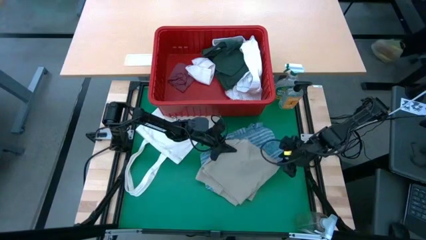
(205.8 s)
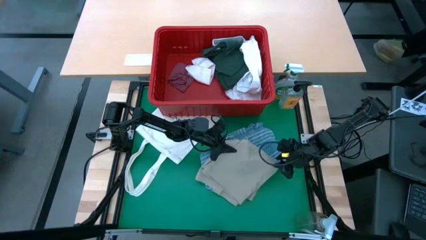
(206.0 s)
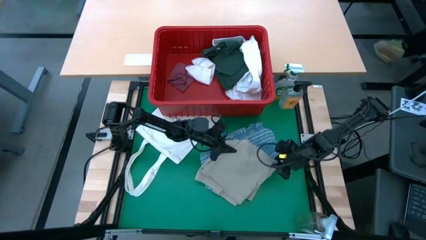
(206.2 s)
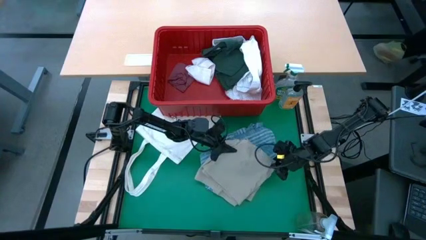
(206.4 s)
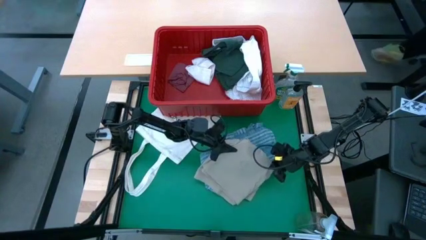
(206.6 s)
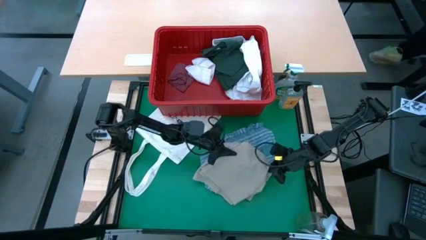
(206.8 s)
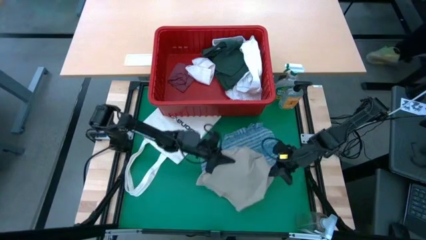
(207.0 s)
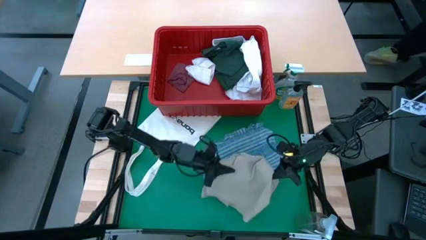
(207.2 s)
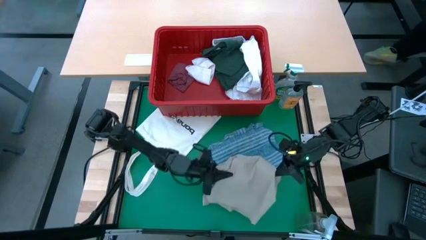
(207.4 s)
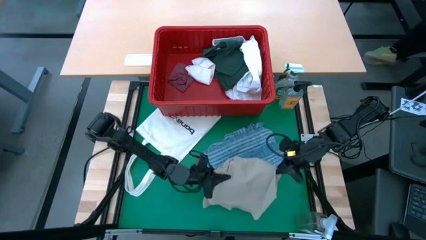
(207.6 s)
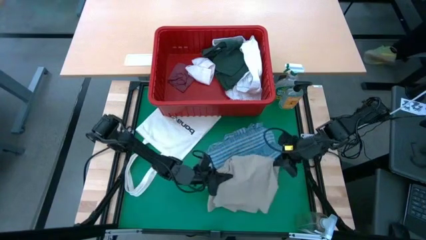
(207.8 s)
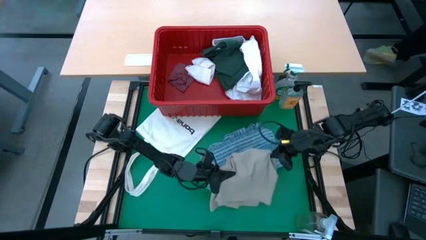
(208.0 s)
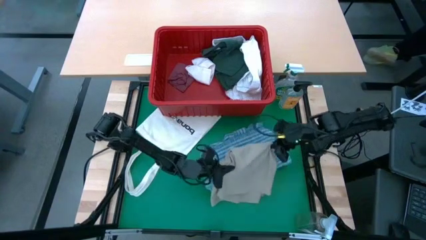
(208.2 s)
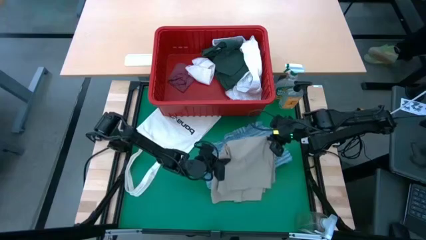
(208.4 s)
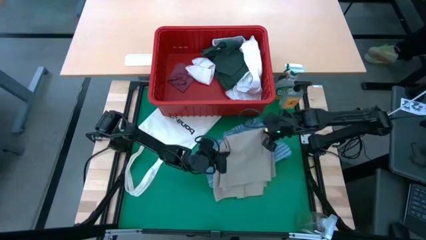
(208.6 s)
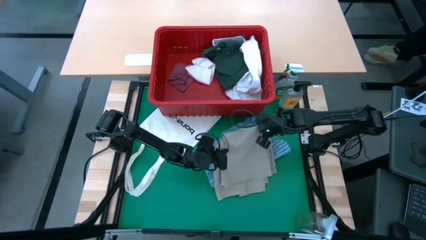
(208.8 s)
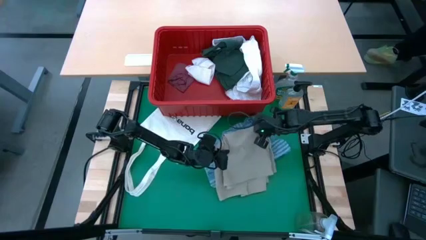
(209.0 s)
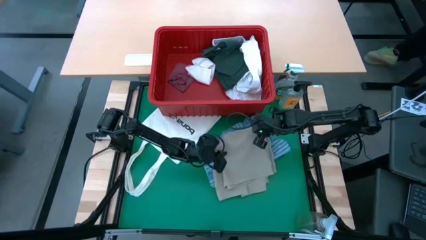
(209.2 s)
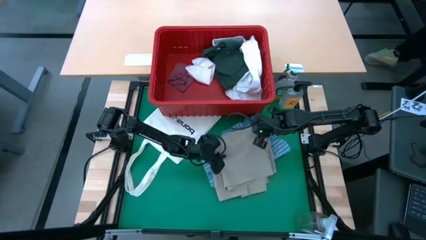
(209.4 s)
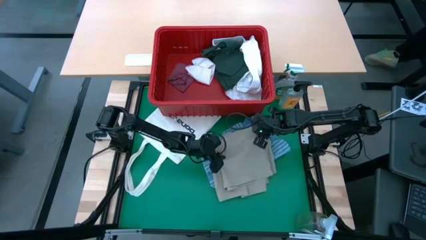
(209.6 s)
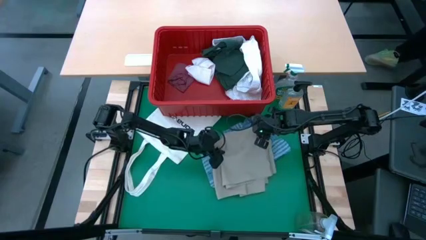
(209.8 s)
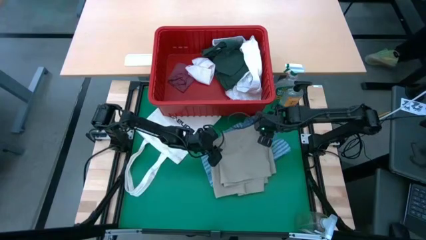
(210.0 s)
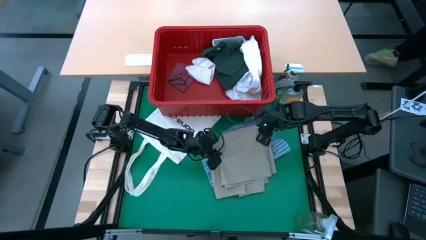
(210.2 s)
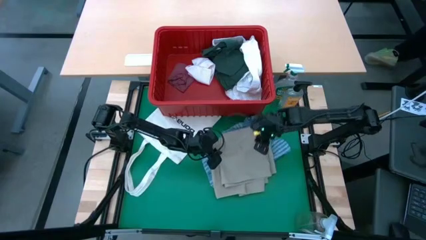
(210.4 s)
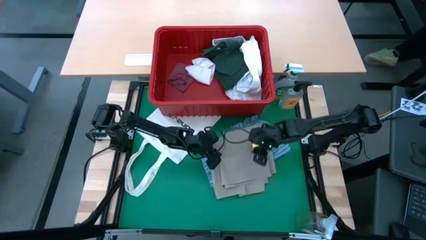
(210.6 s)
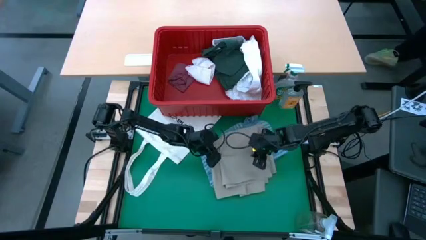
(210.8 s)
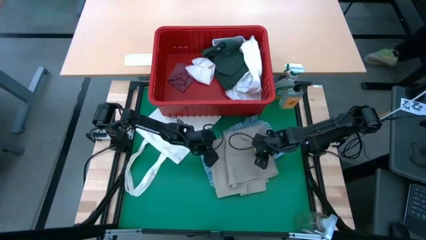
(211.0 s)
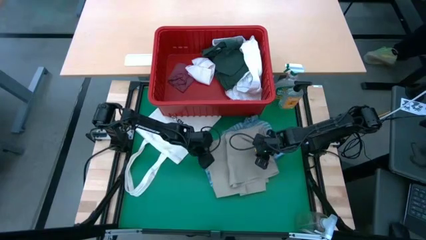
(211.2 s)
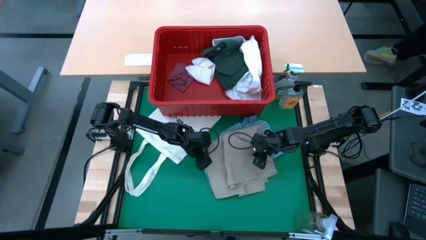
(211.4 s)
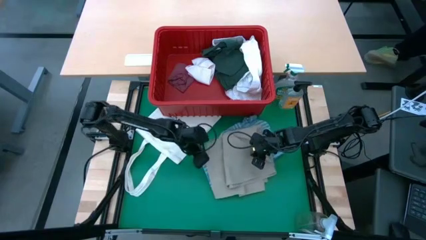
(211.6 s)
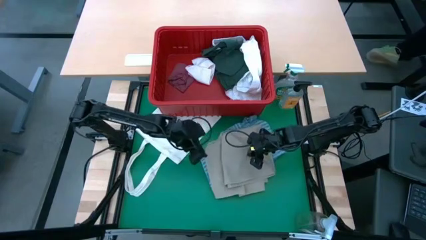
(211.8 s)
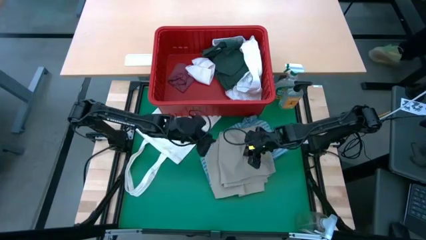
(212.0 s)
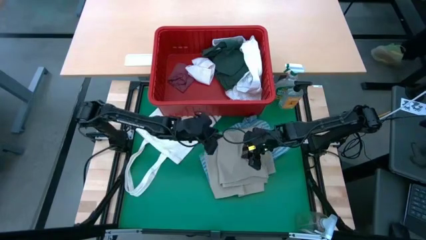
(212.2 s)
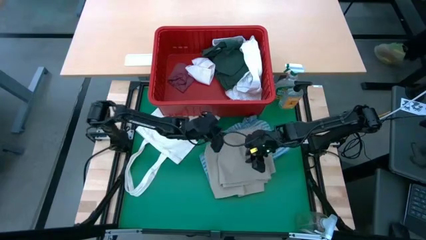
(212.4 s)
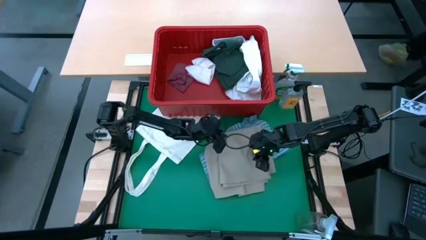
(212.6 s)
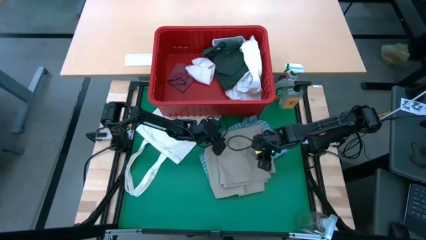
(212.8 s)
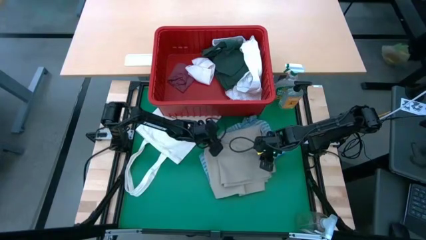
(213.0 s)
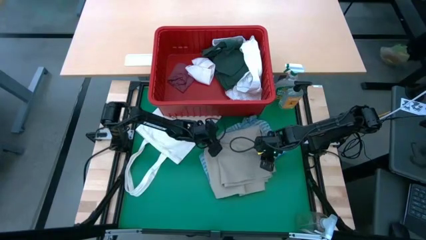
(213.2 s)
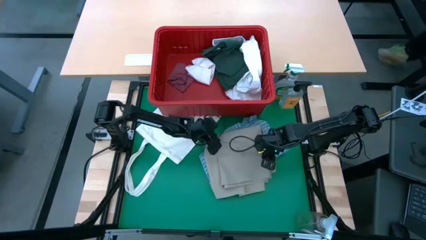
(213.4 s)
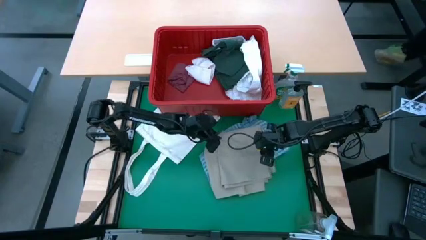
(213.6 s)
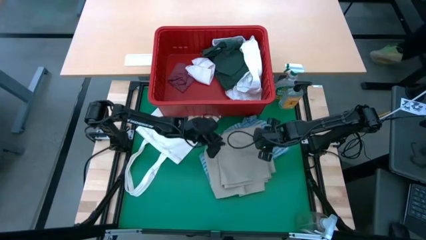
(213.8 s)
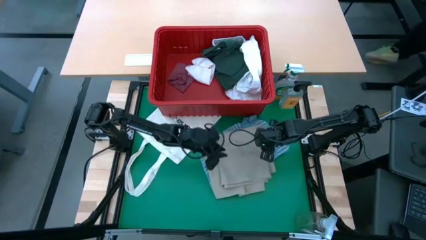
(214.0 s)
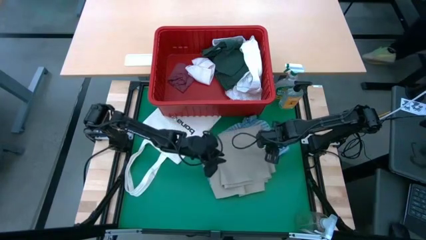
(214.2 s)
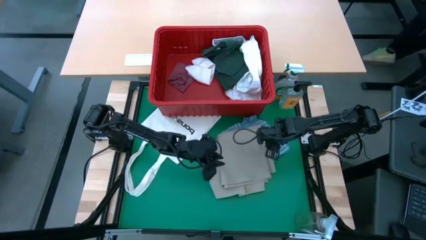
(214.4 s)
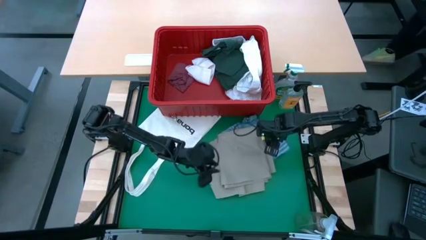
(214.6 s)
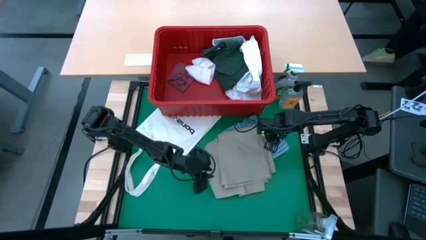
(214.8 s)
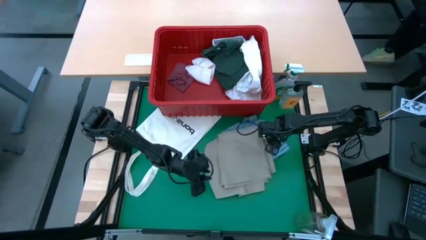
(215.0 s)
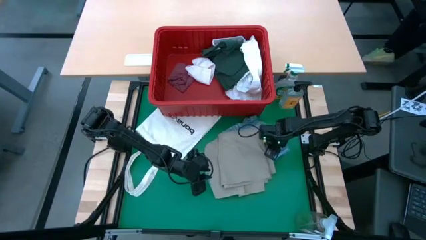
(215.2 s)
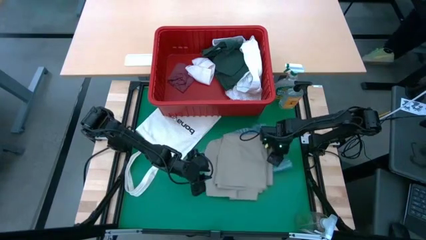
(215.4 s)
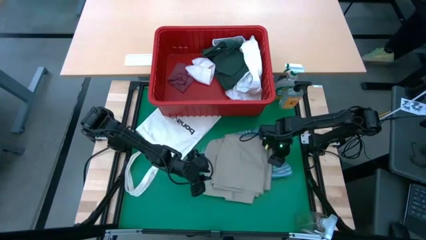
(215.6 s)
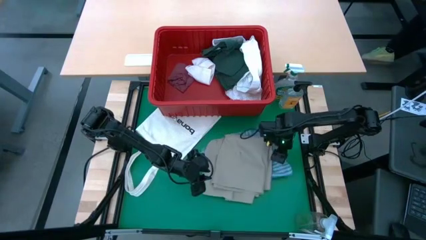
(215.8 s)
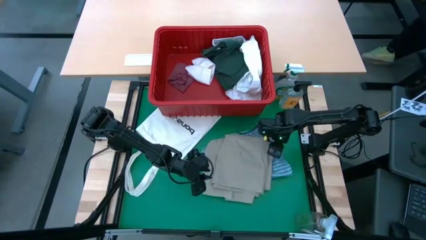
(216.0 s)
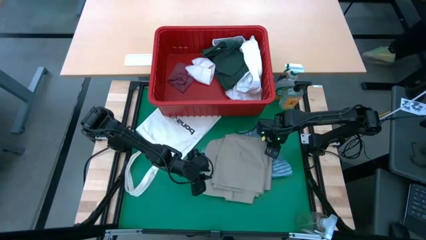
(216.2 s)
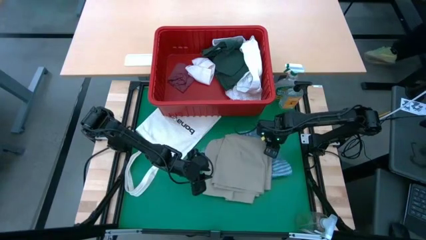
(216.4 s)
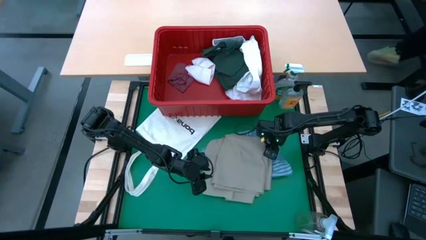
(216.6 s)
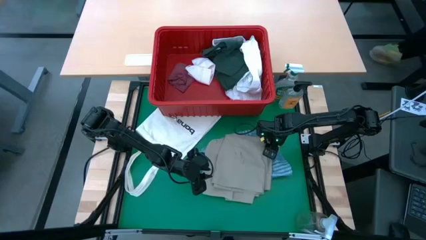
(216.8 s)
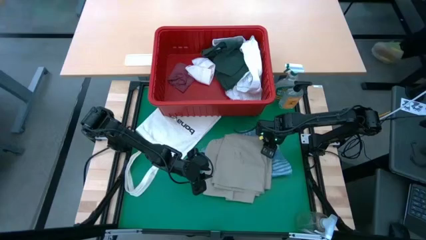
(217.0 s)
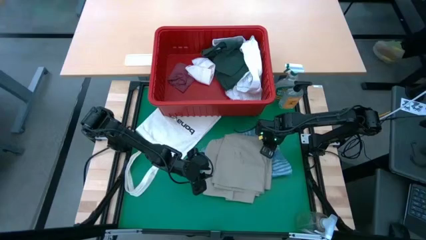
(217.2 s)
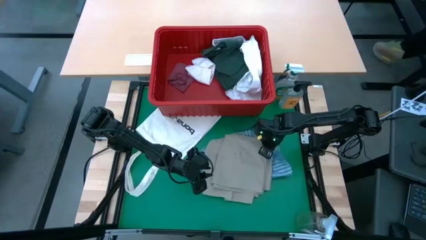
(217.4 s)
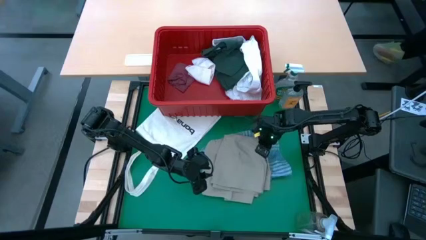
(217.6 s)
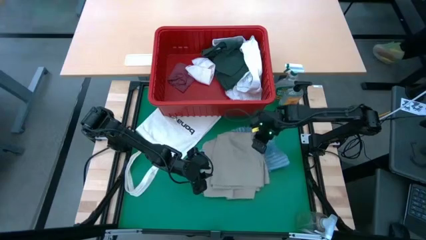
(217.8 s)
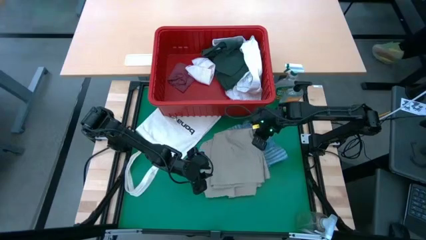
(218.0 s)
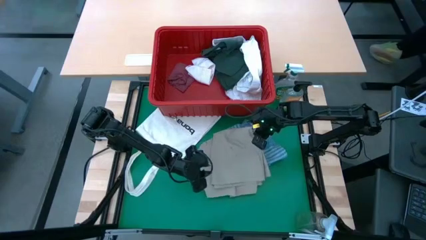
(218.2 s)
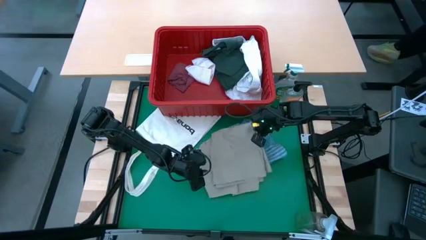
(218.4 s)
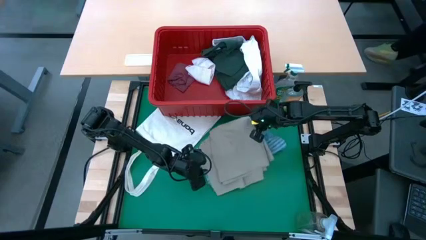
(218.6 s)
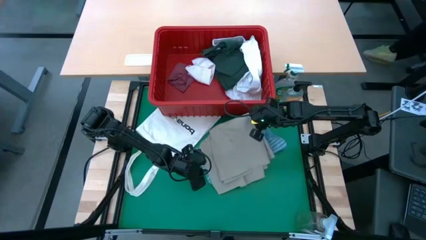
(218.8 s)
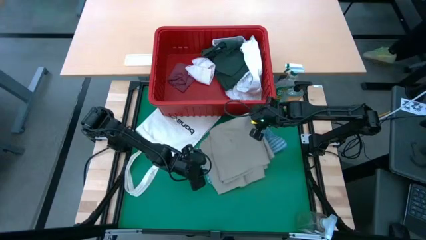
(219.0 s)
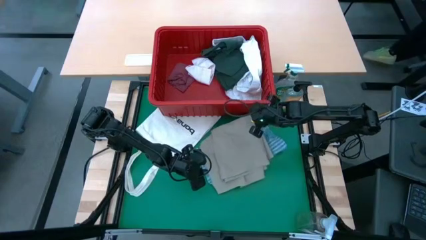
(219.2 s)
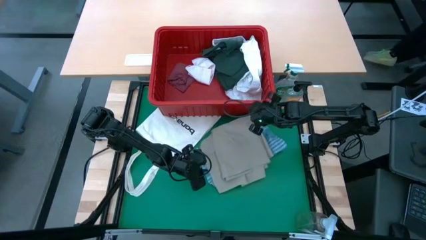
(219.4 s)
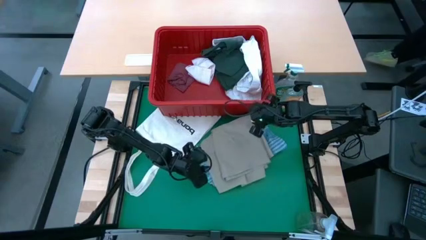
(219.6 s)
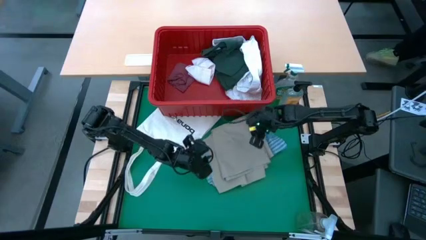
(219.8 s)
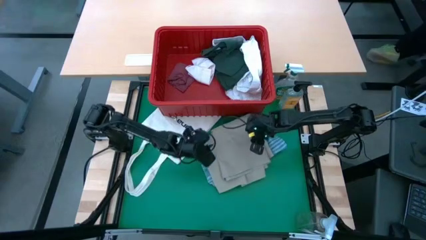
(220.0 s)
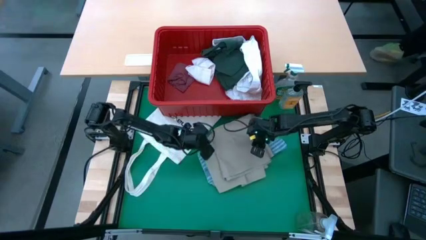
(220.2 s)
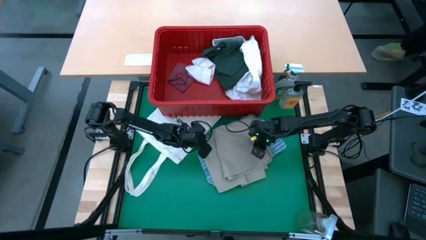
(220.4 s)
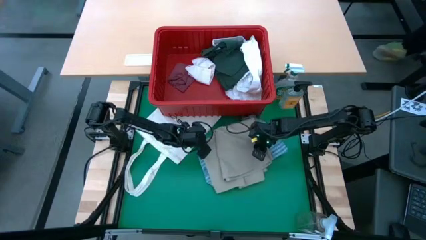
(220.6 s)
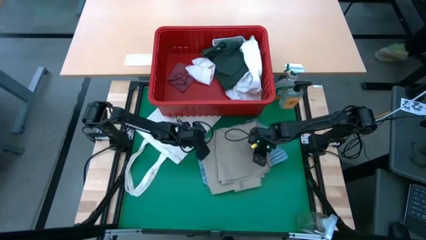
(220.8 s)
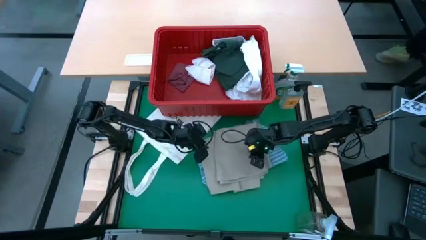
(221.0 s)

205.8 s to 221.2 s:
Task: Fold Laundry from Bin
Stack the brown shorts on top of the blue polo shirt
